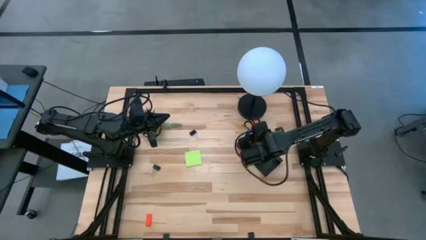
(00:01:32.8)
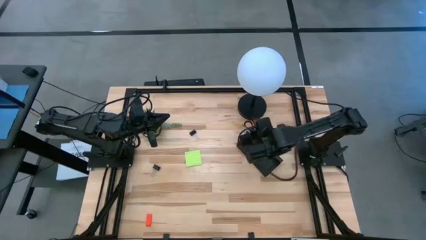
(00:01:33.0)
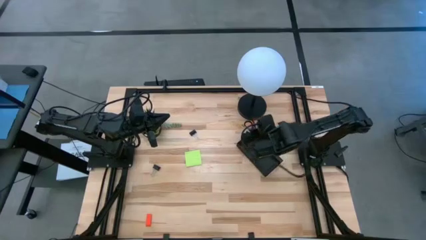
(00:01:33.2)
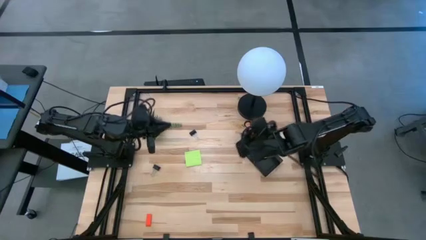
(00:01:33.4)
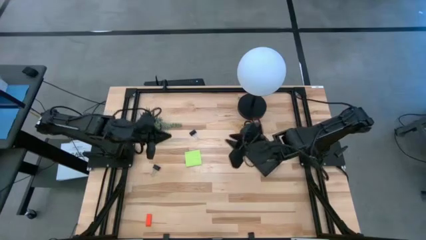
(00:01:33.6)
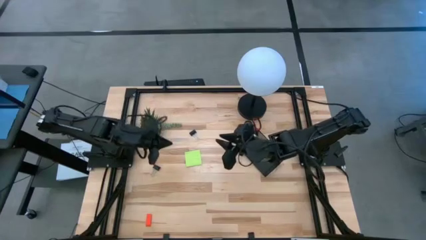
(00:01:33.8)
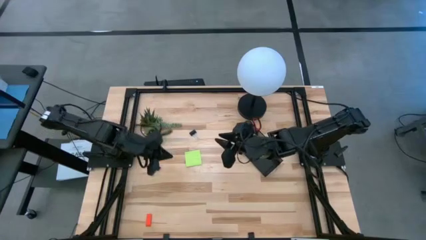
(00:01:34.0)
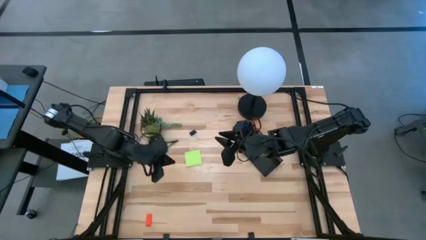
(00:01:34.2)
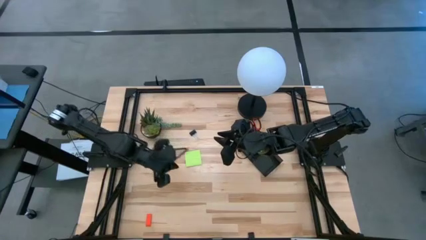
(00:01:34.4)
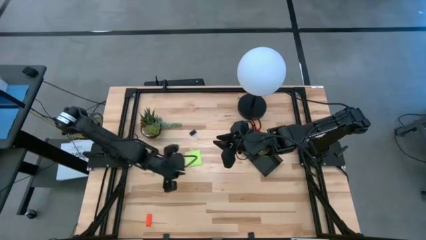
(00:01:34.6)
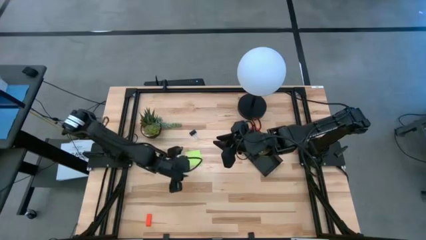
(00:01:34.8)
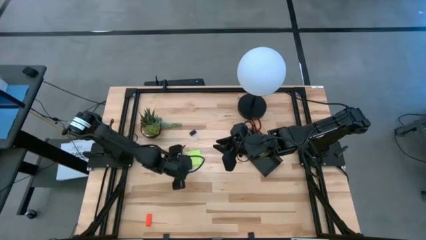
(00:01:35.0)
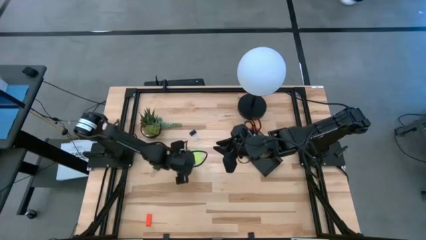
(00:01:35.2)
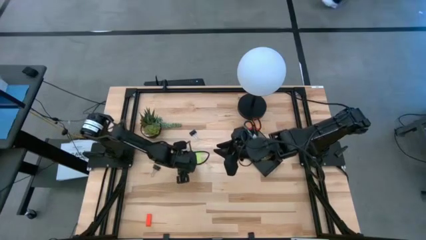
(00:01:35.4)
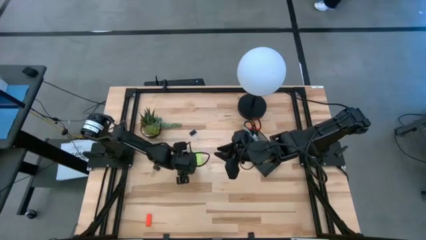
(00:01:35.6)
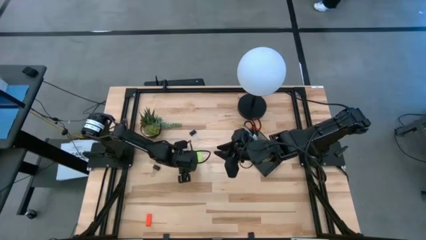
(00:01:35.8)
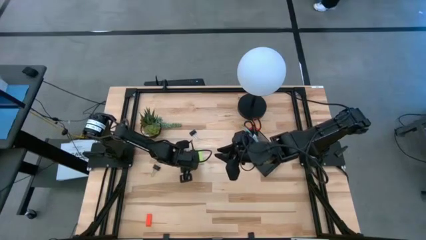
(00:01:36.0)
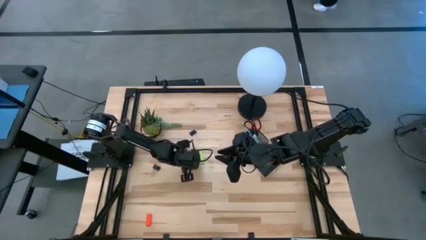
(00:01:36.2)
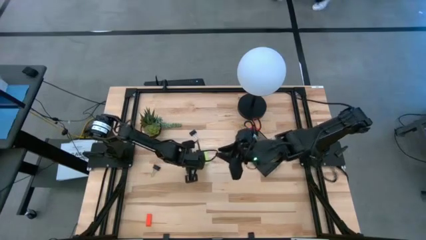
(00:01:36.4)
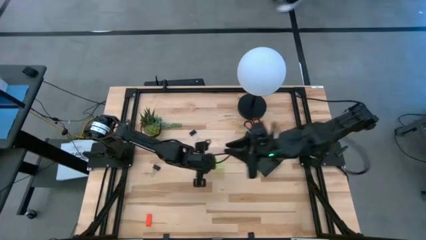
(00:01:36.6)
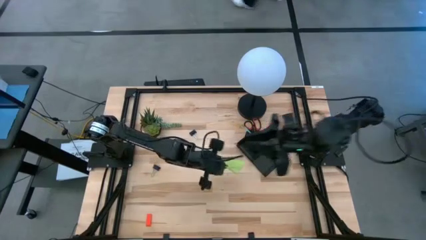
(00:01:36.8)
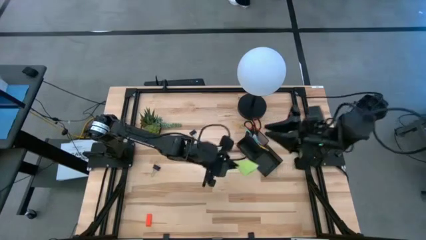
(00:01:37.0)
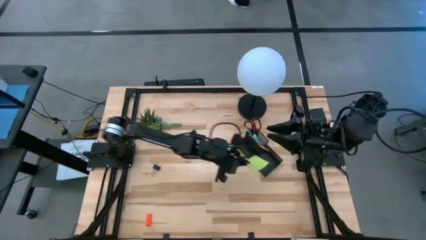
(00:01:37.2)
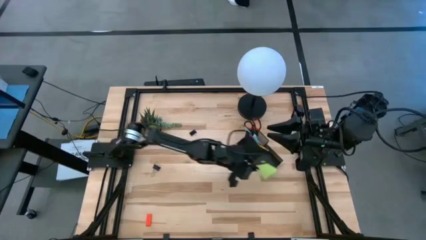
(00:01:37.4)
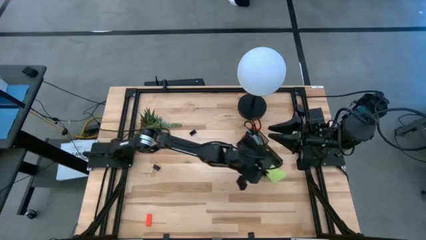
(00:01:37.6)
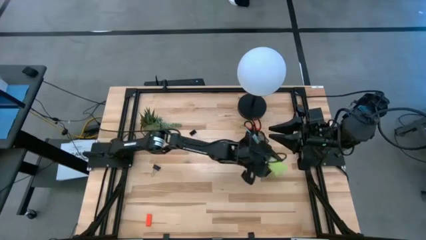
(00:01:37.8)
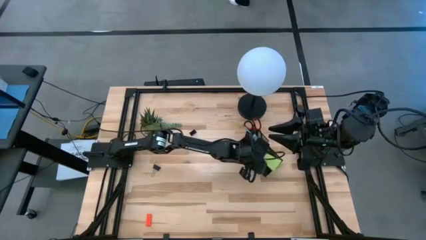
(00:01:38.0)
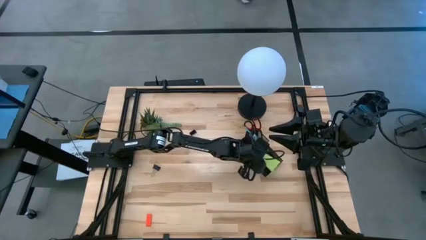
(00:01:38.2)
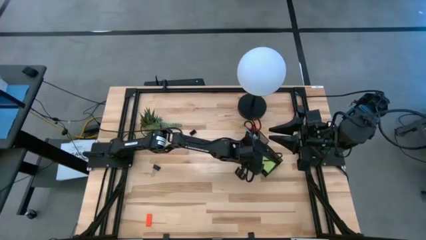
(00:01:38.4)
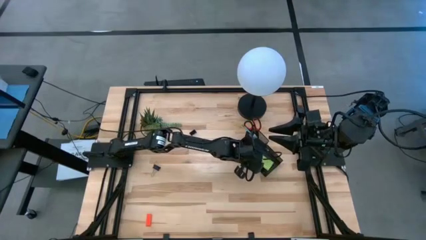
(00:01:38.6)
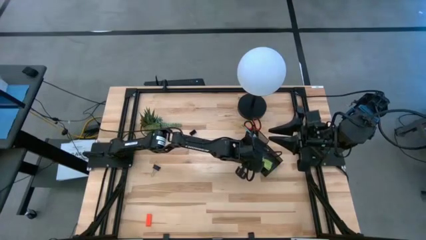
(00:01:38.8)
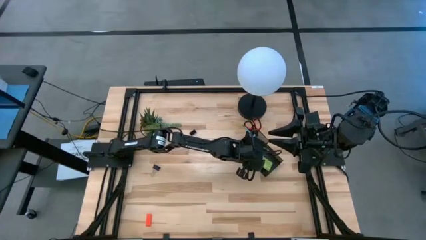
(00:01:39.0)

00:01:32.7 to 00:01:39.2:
Task: Pick and place office supplies into organizer
Put the green sticky notes into the black desk organizer

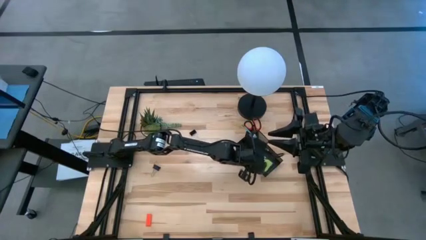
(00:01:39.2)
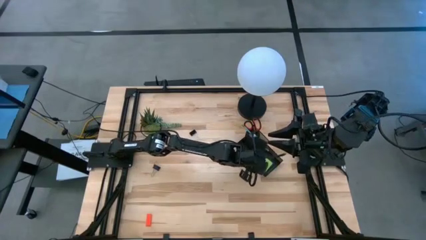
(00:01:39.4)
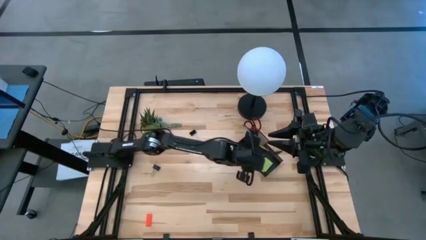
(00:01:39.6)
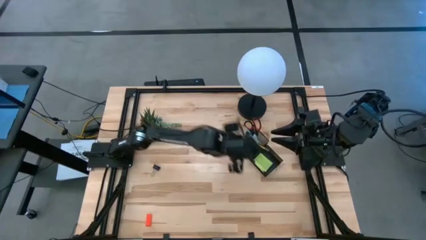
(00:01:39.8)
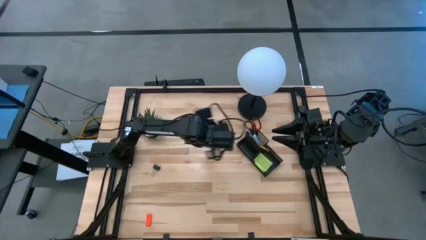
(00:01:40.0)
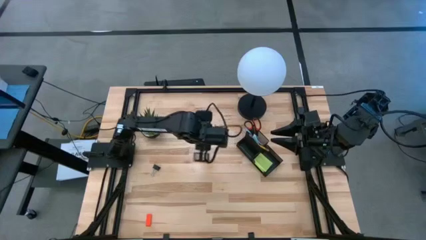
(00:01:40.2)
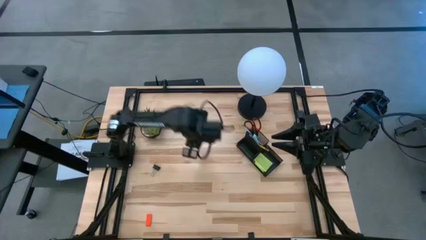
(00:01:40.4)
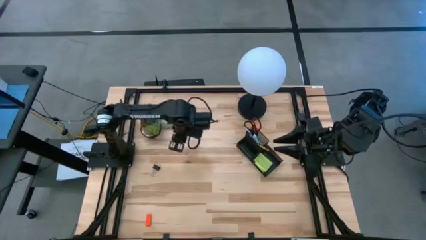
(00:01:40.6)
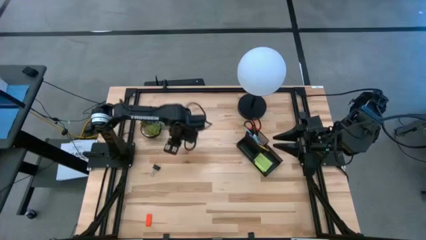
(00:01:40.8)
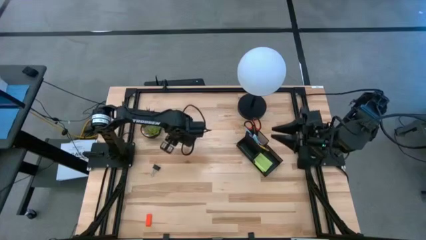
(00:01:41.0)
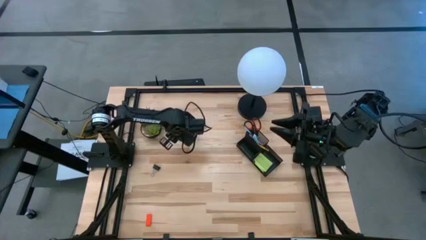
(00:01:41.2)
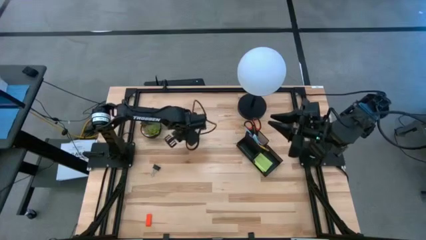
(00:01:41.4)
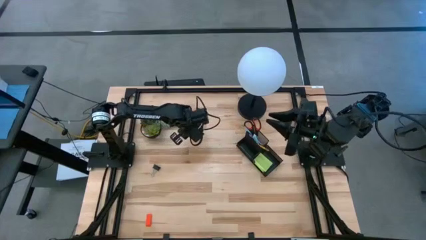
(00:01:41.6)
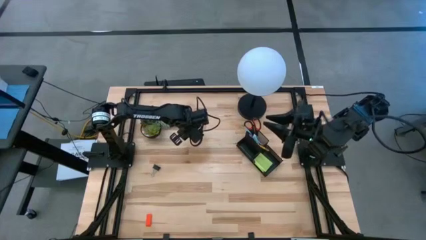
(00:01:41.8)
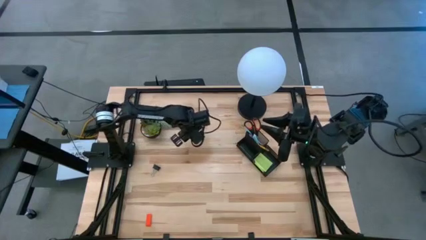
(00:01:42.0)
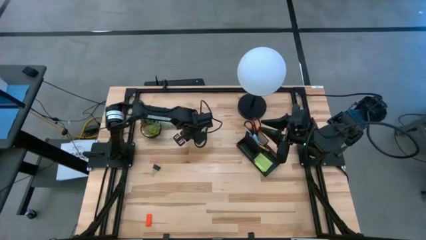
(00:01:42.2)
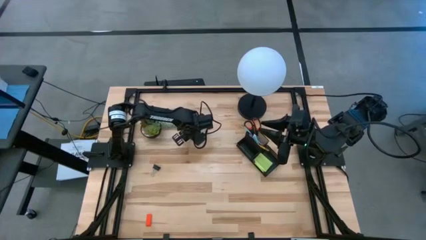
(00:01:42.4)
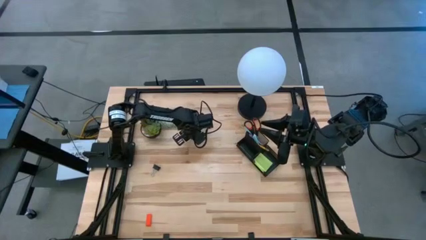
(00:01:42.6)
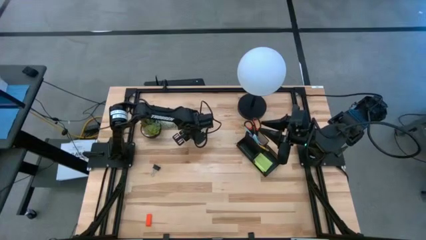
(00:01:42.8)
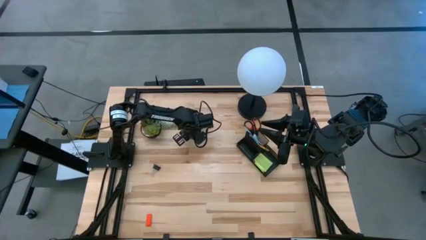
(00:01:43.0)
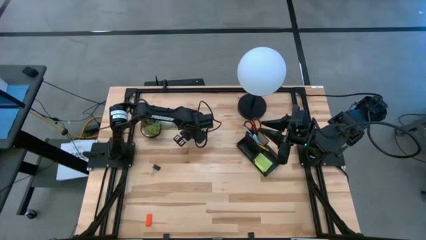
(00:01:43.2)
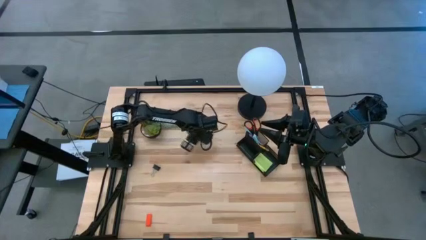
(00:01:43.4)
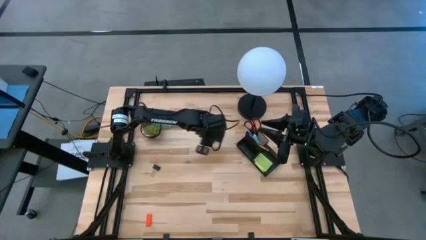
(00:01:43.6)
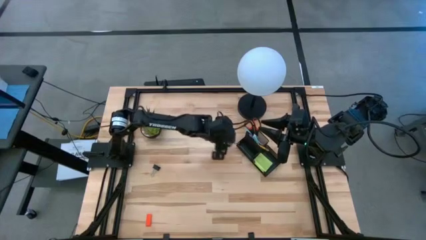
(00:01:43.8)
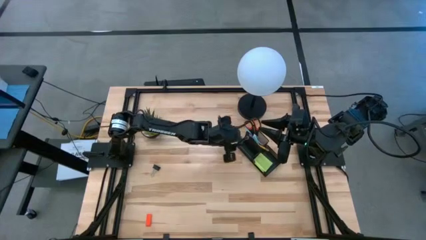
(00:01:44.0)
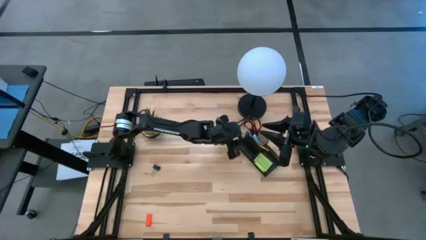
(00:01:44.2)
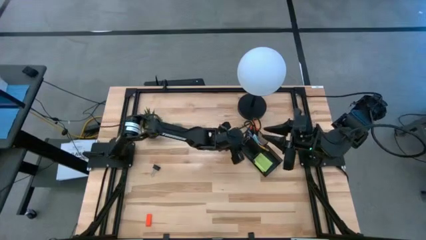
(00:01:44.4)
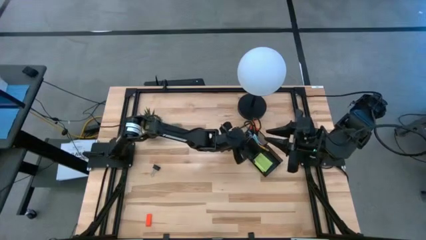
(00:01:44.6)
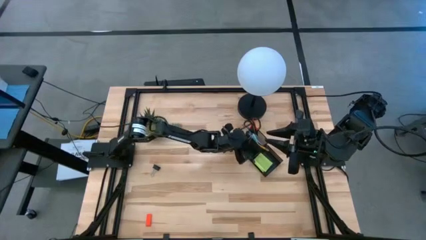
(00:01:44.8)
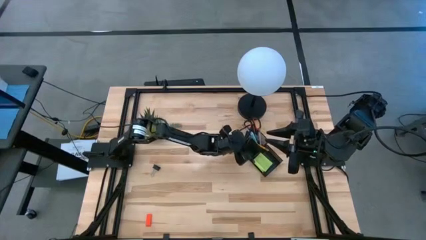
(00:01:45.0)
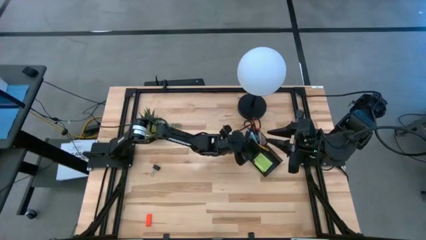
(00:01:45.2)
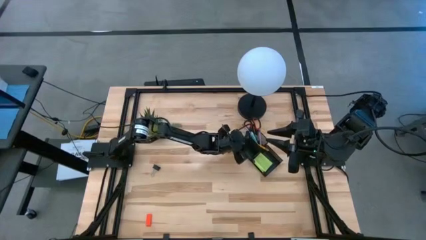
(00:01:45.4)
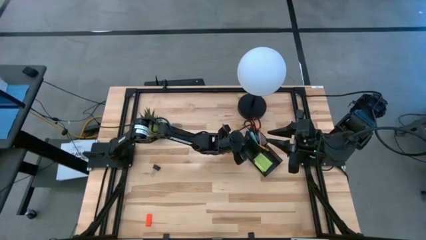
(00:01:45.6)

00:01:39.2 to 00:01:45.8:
Put the top black binder clip into the black desk organizer

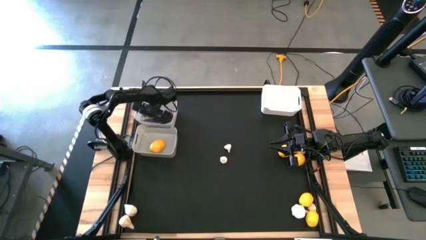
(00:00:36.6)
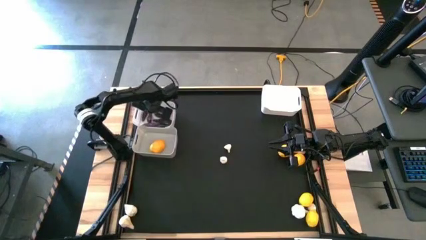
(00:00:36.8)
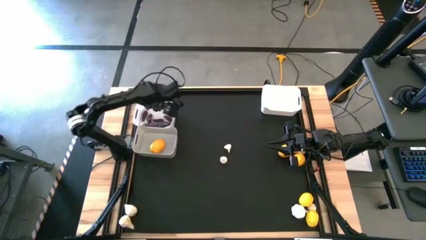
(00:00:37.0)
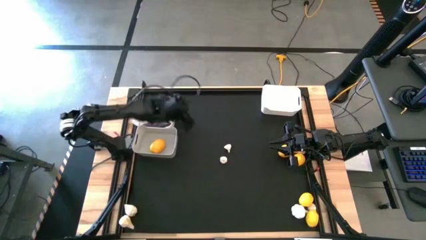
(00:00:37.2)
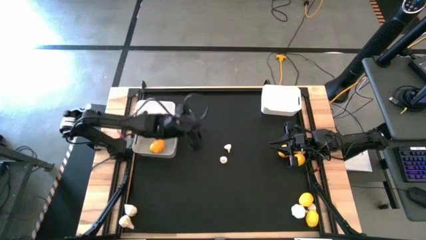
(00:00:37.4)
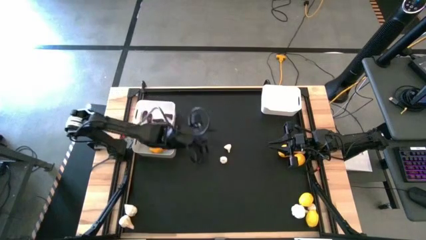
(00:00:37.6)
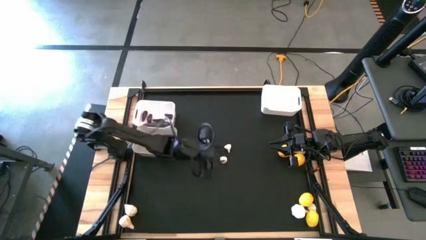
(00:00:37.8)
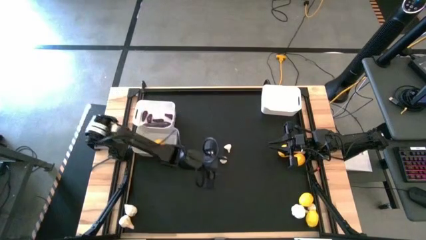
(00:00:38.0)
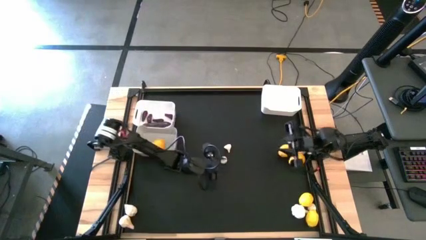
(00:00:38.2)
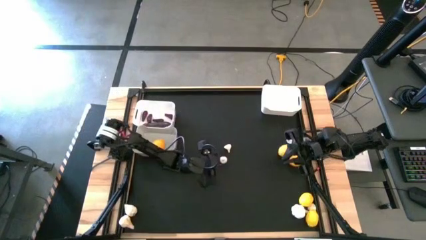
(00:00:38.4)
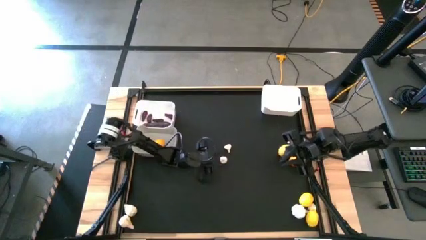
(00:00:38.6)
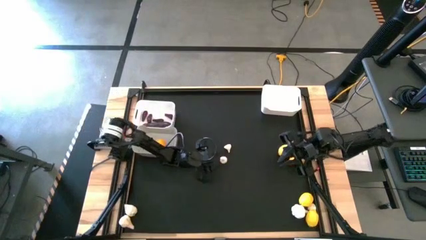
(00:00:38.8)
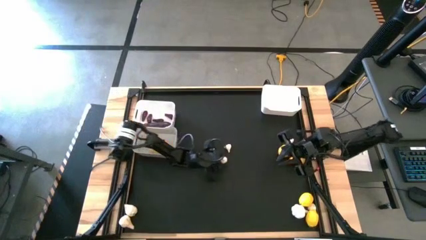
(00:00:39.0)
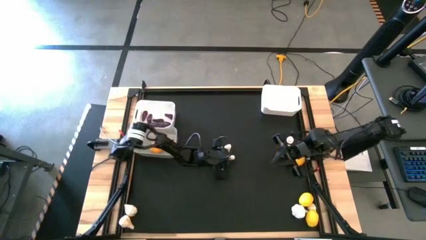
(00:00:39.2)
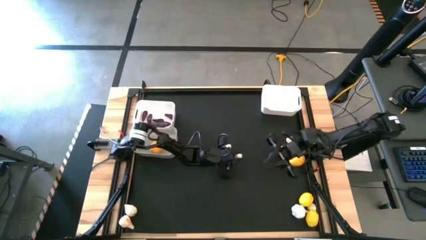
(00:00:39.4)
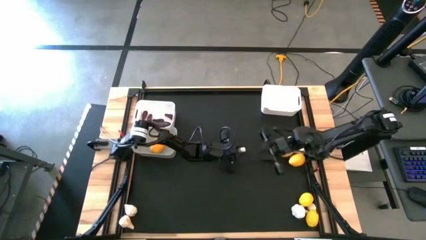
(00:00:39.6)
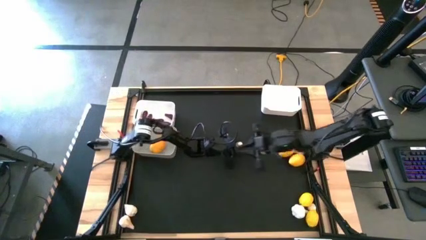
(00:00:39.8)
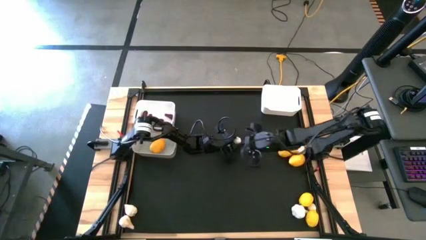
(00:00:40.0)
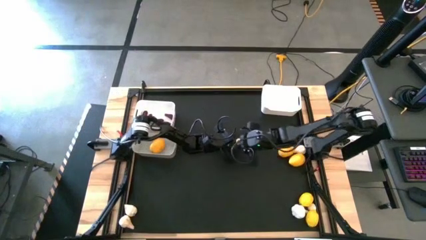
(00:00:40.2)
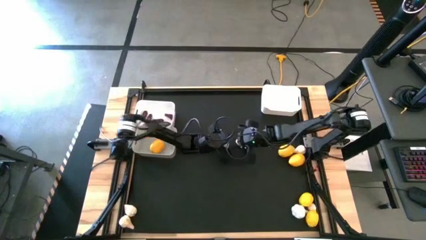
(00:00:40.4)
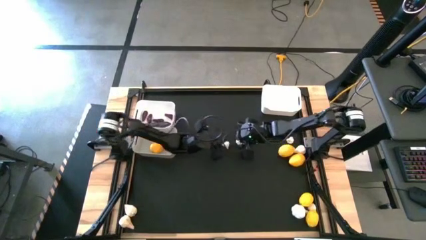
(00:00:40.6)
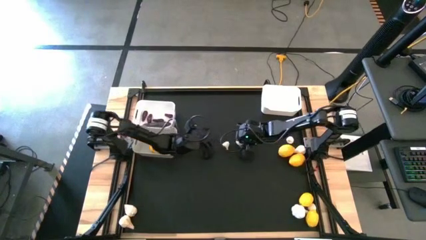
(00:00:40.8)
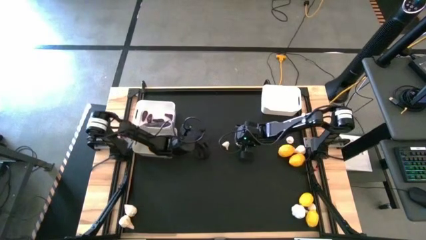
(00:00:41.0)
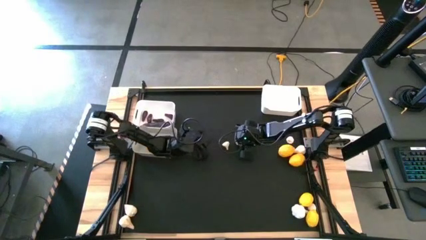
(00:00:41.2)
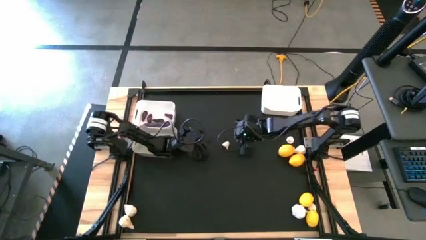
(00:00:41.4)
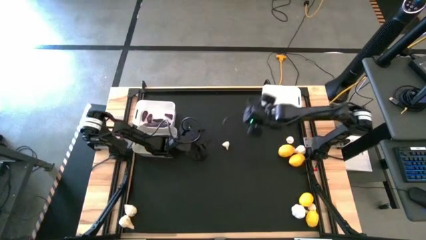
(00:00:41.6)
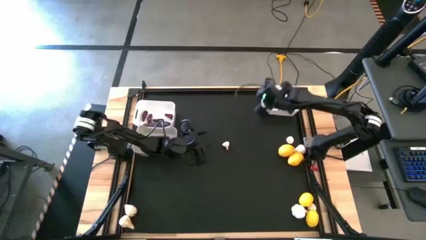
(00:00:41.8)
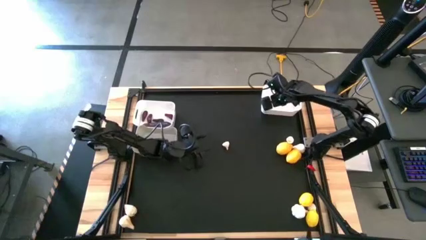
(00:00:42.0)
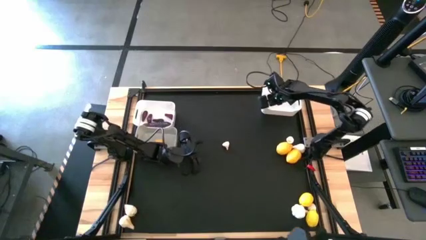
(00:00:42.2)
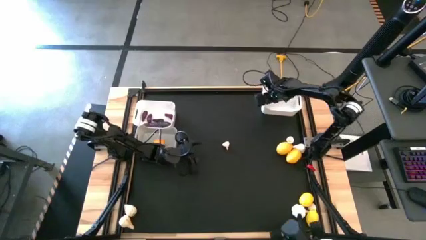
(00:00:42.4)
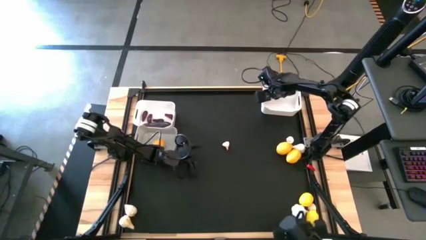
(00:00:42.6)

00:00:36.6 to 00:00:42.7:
Task: Sort produce into baskets
Put the garlic into the right white bin
